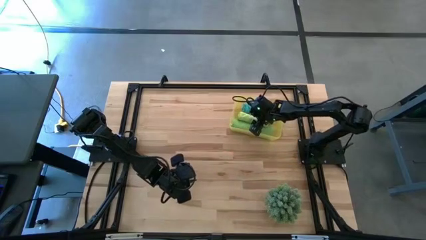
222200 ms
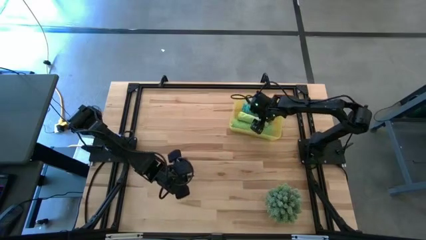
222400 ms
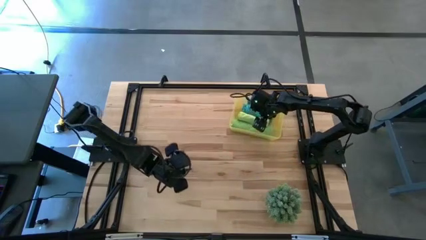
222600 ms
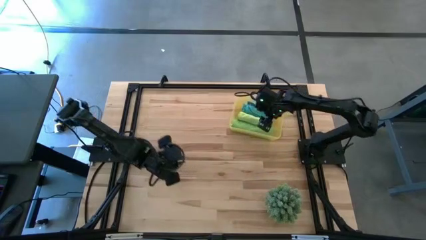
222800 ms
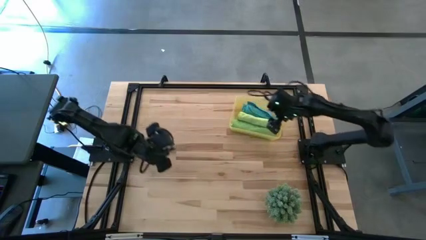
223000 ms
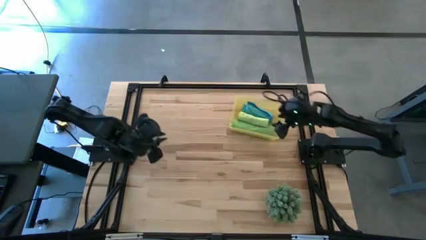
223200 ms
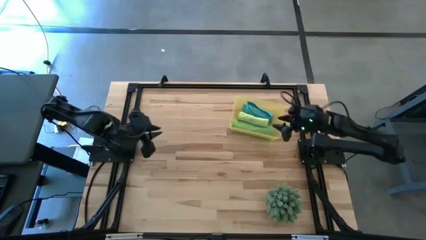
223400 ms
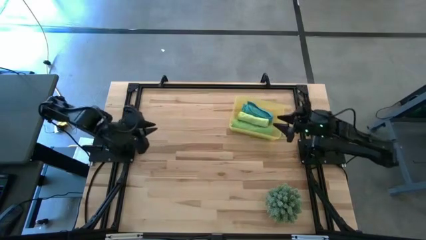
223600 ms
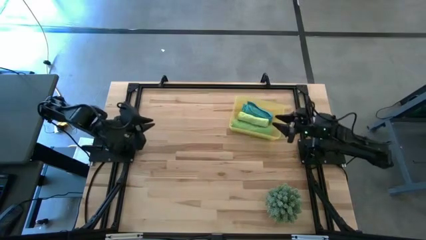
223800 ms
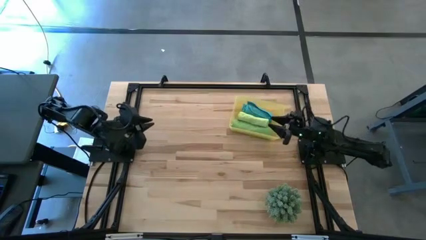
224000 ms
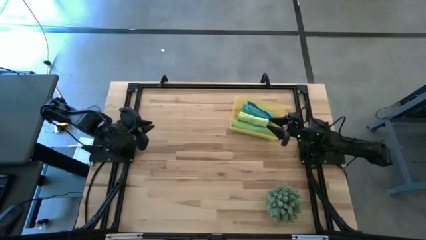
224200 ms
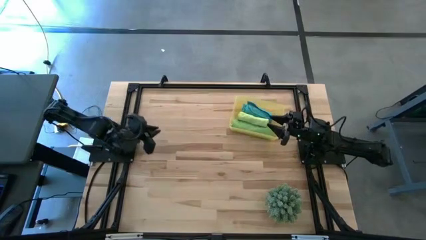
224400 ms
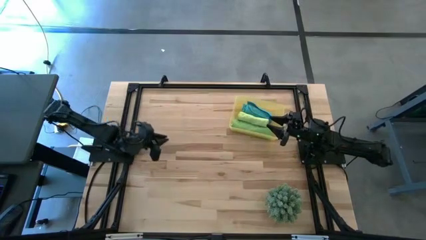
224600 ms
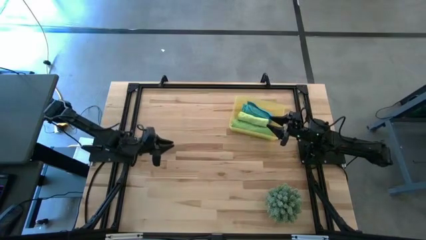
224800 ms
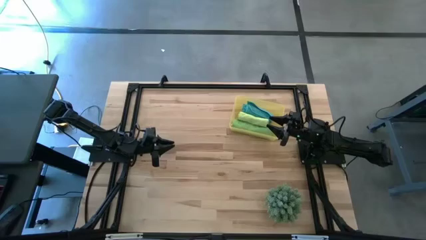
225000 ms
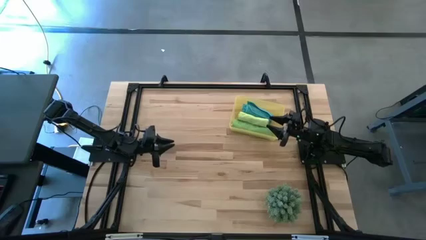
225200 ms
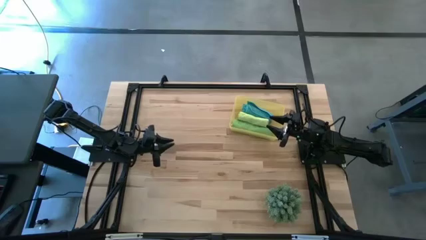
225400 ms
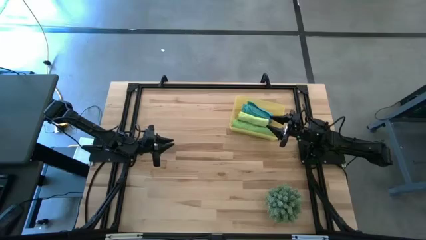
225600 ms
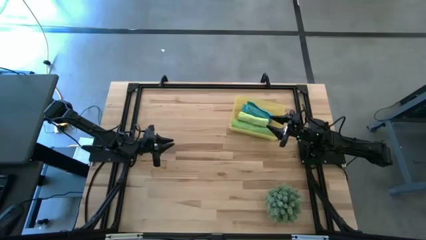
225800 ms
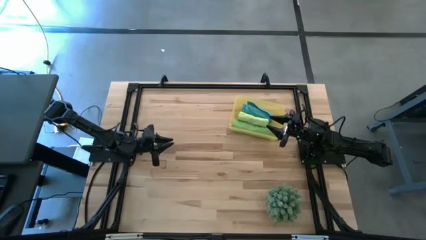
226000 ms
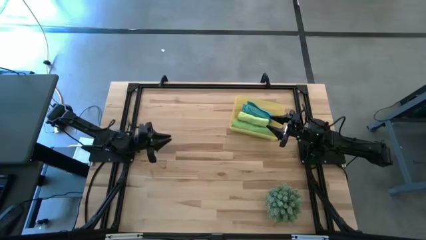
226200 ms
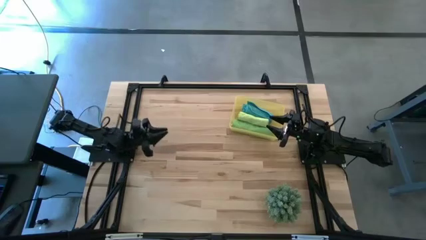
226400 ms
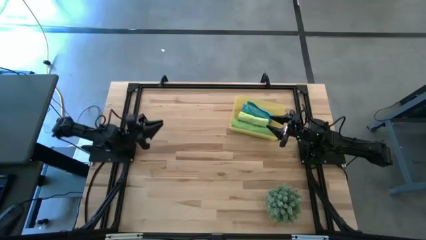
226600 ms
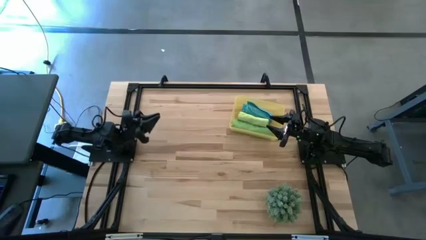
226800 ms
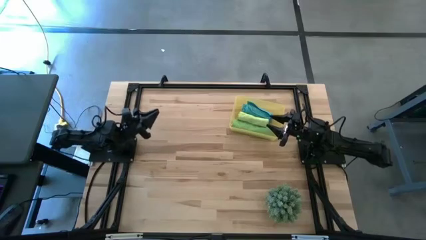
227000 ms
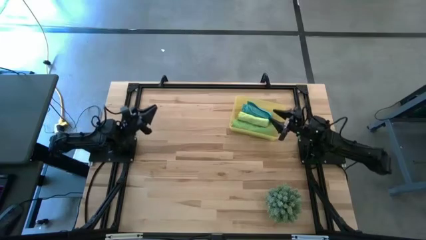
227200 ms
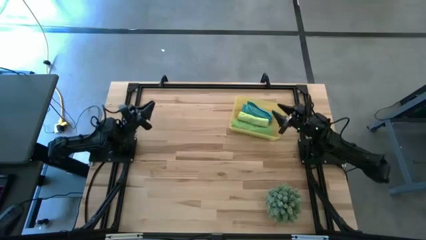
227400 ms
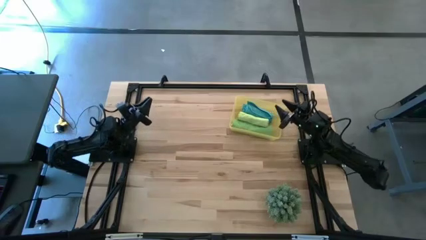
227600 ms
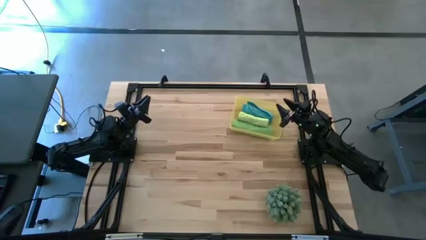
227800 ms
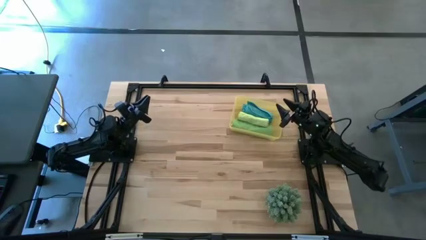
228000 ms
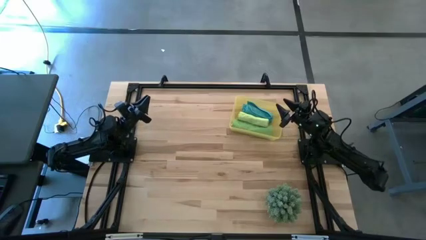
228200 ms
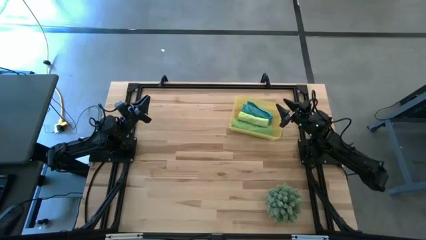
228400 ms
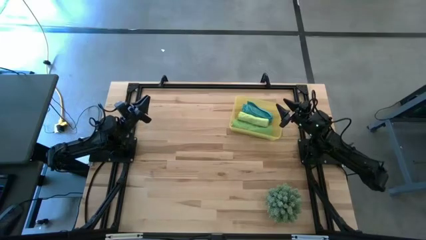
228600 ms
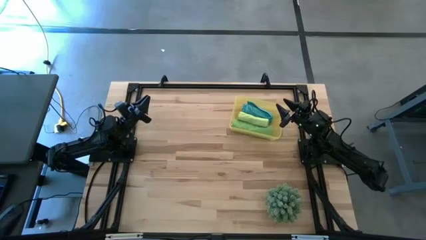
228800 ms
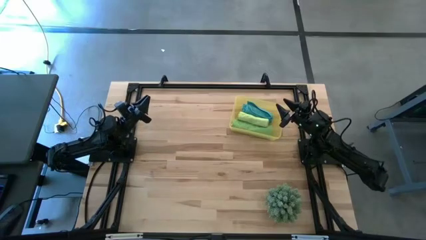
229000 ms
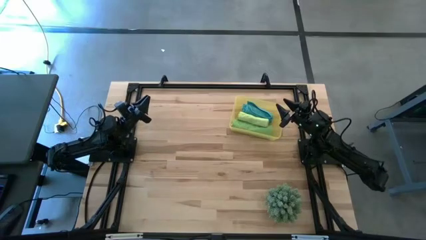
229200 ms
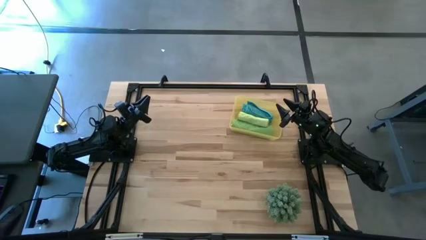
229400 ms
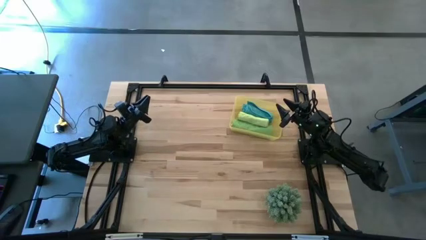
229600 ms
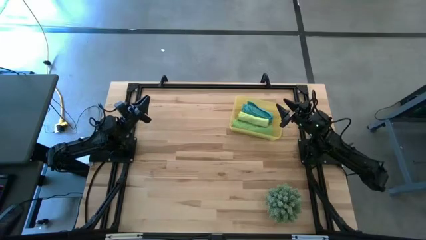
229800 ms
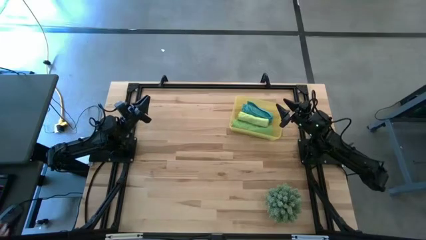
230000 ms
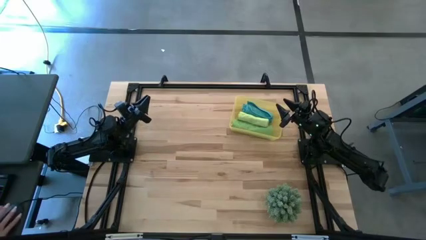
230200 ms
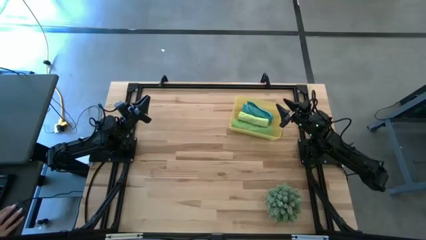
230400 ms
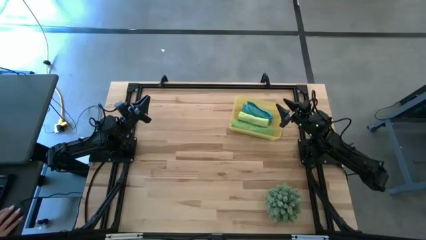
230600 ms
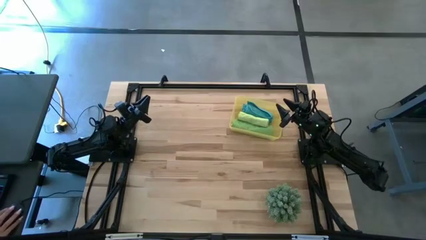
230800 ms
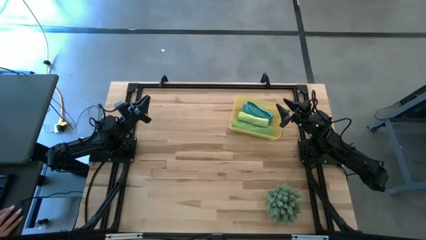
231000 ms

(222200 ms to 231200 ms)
Task: Roll microfiber towels into tight, uniform cylinder then place into a basket
Return to Home Position

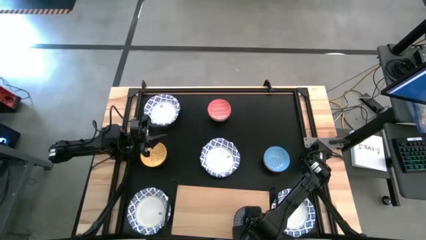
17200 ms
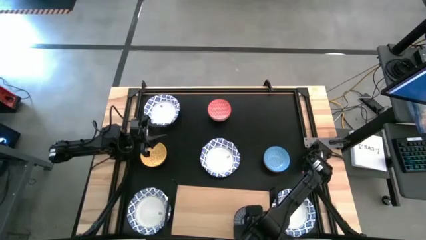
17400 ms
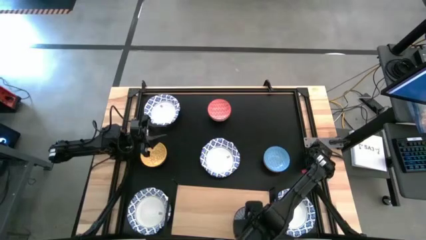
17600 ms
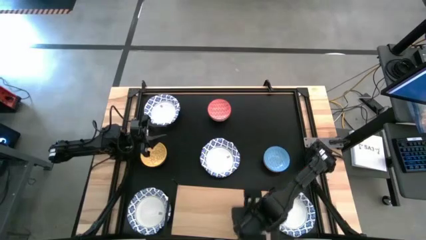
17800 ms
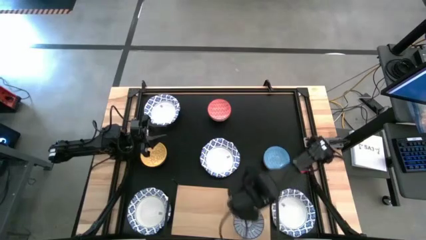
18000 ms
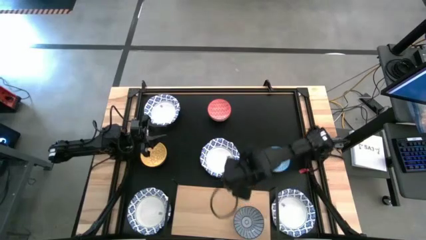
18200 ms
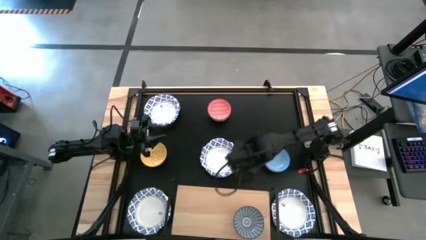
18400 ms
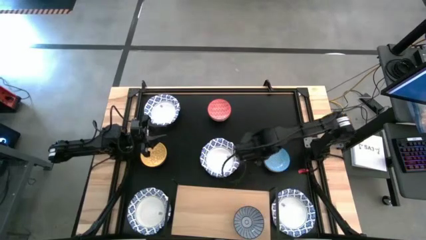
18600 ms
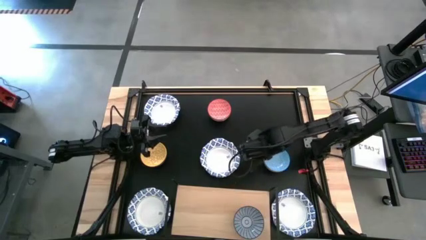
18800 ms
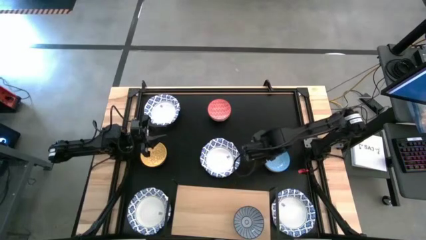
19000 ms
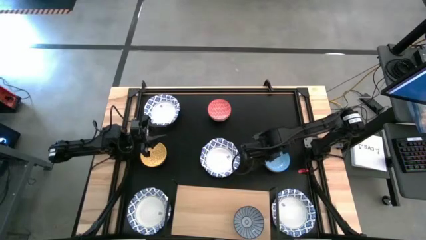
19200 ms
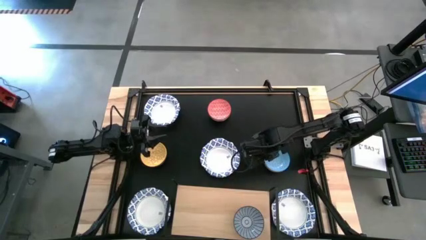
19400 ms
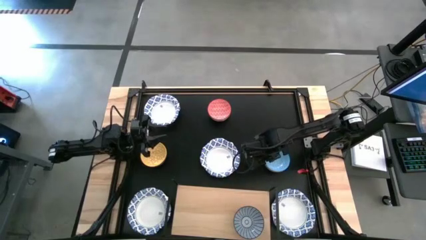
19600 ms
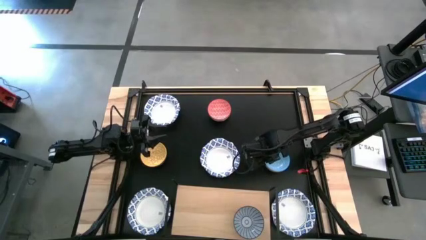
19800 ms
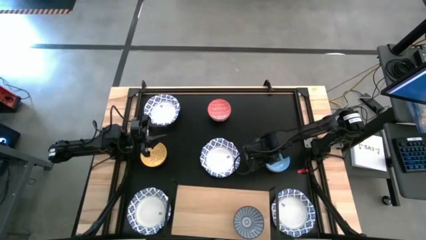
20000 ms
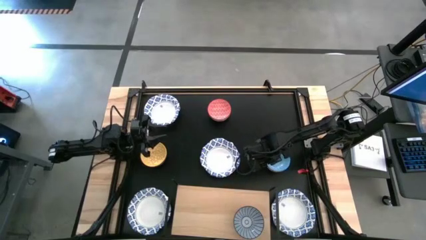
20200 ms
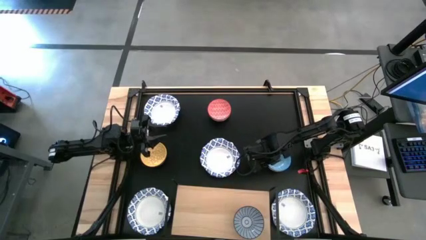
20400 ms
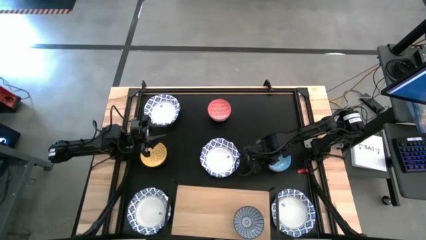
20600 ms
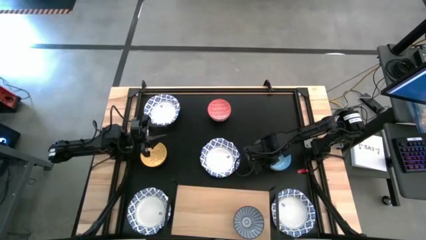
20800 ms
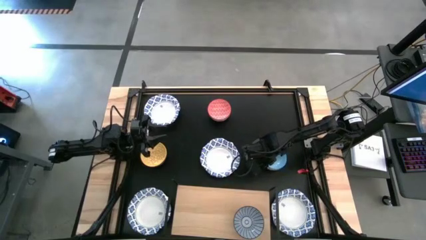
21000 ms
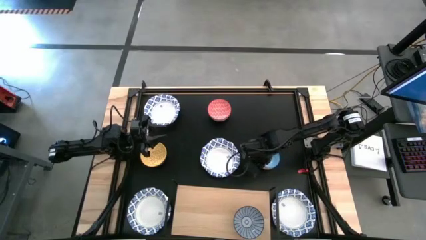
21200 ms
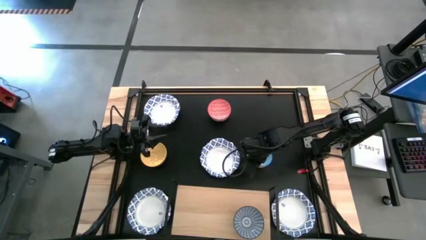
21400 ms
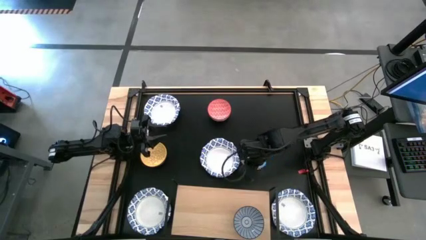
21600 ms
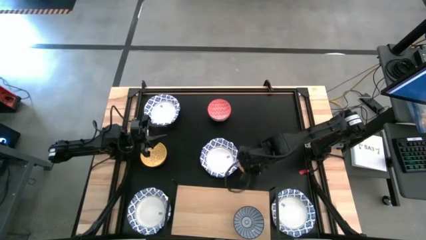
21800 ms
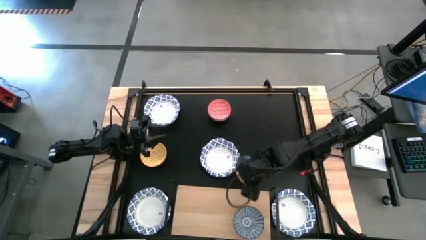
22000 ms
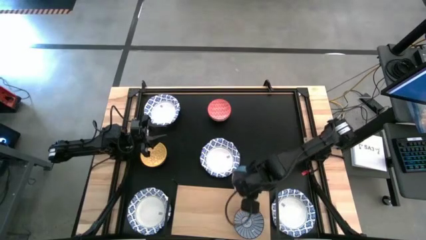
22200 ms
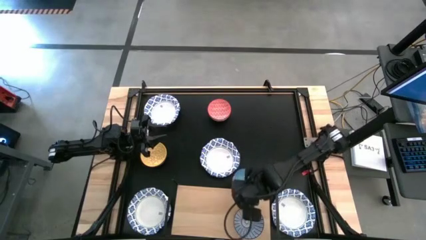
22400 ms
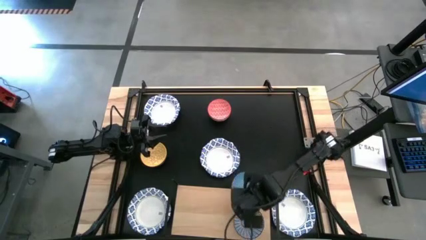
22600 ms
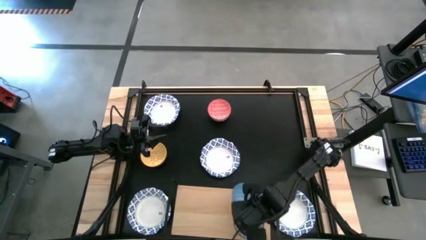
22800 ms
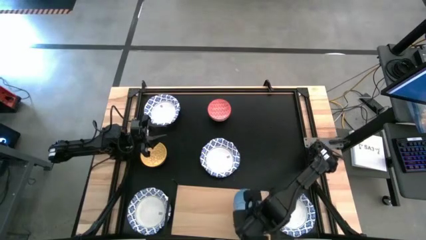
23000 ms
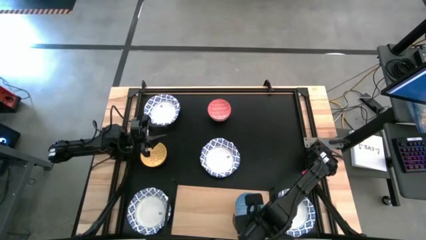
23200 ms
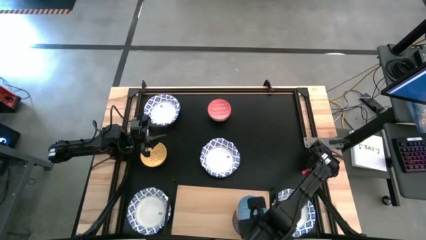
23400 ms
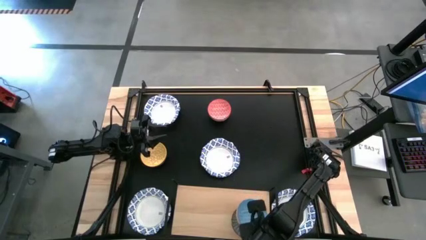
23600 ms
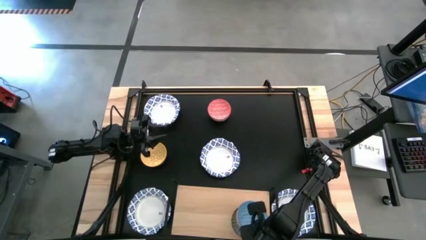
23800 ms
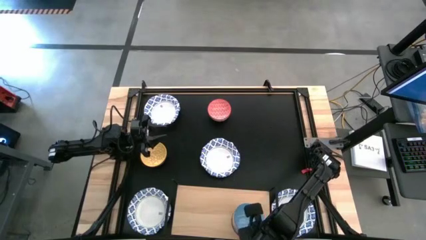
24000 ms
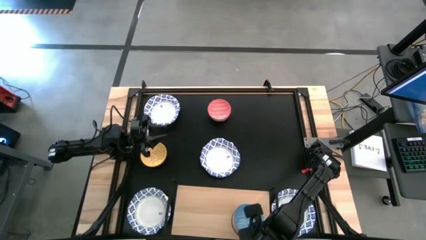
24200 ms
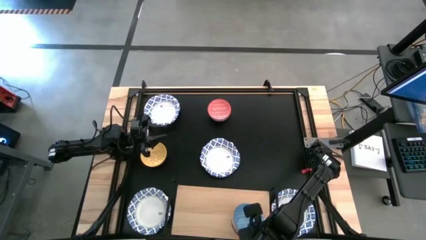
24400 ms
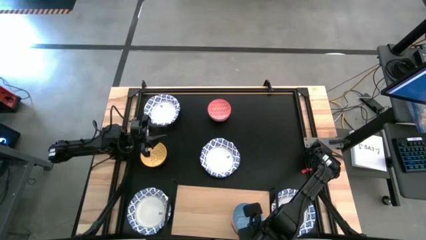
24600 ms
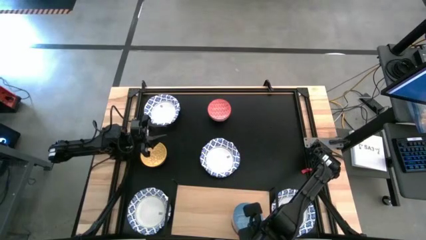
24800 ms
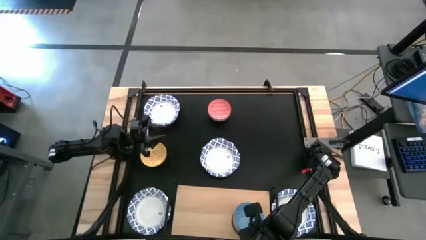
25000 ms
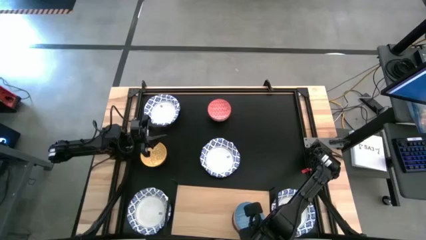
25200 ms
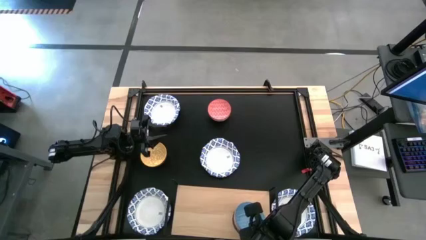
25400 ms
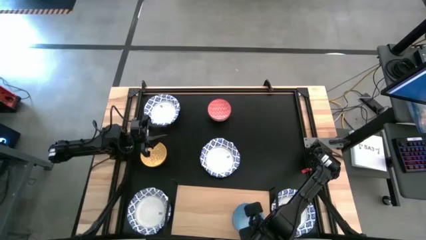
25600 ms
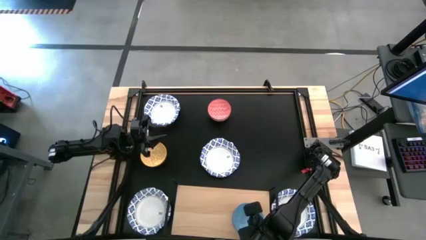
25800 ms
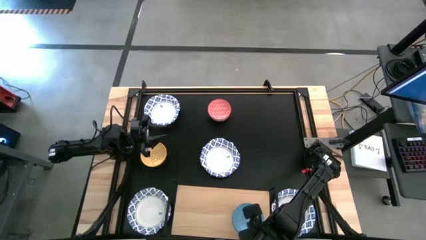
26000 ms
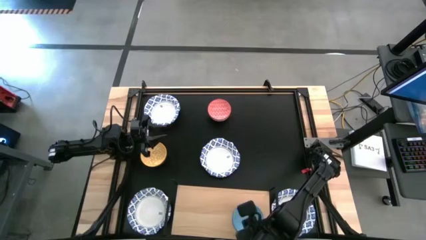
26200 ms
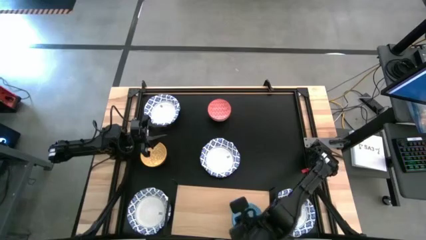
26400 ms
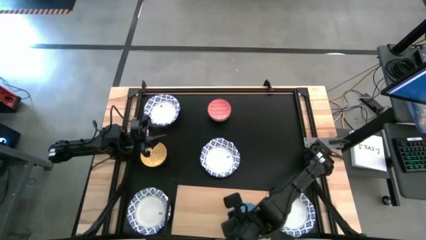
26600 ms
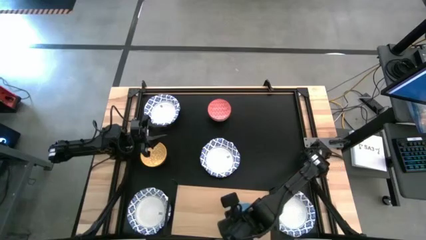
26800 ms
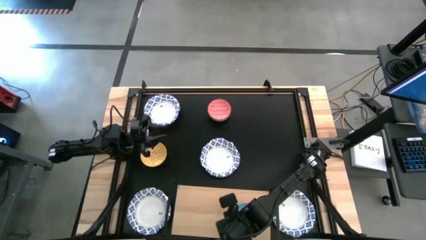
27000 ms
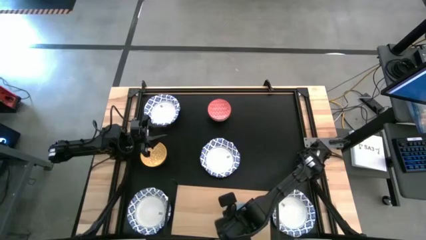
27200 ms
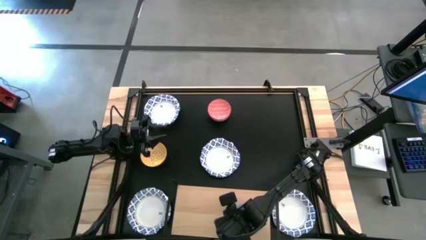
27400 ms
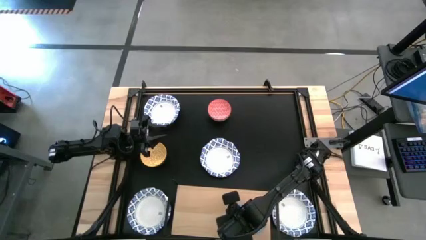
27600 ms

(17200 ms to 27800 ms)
Task: Place and stack bowls onto a shelf
Stack the small light blue bowl on top of the small blue bowl on the shelf
